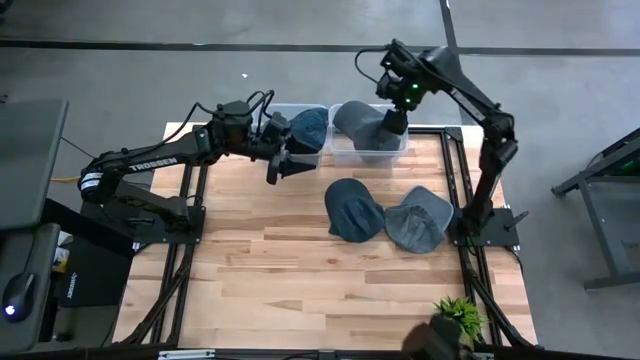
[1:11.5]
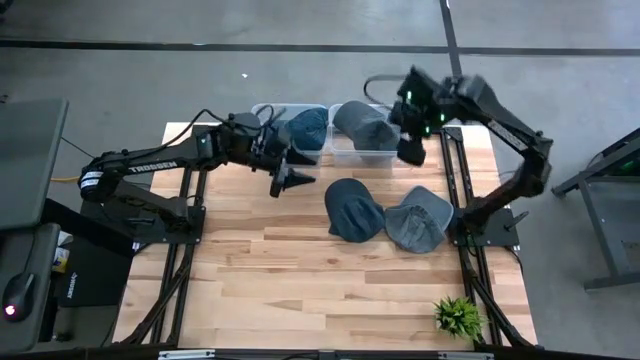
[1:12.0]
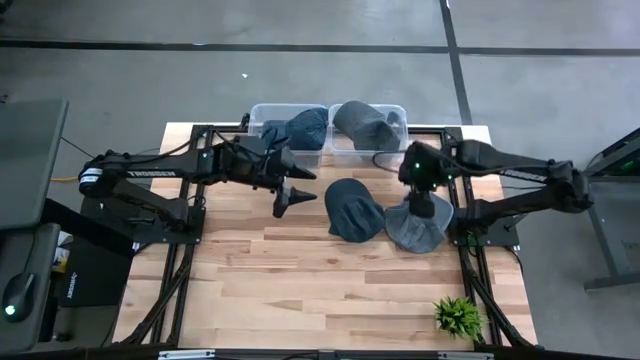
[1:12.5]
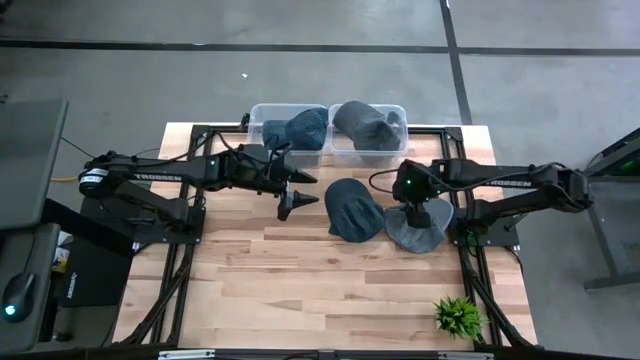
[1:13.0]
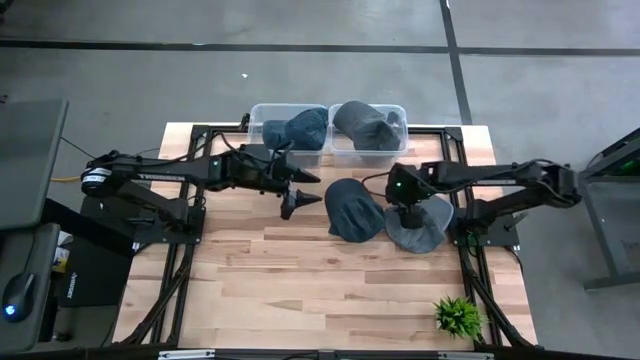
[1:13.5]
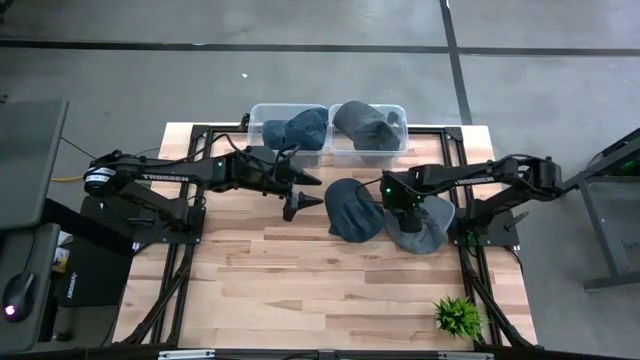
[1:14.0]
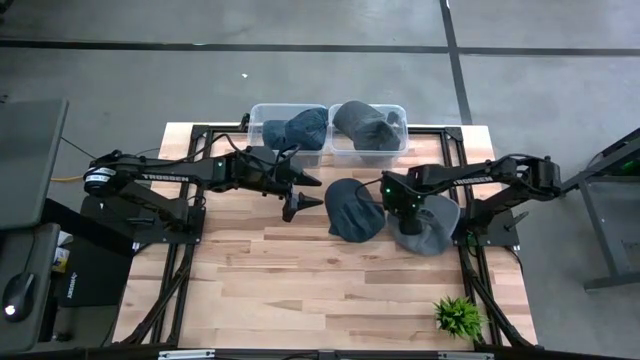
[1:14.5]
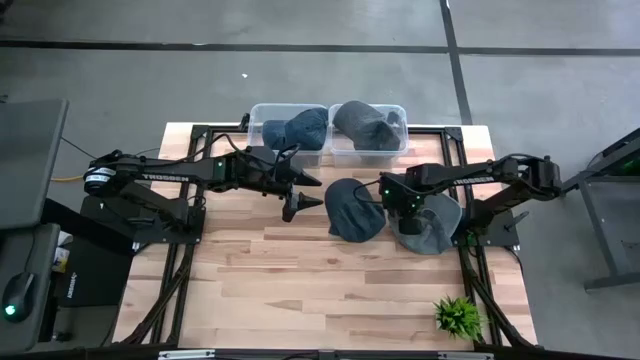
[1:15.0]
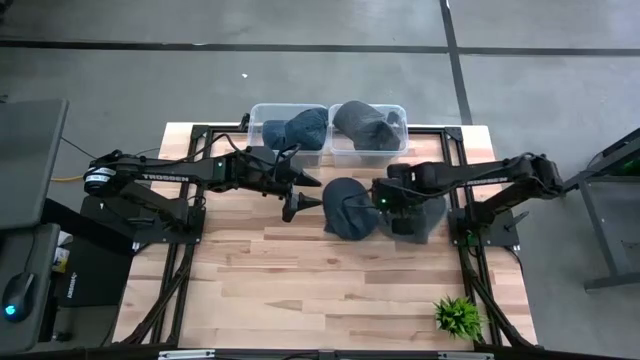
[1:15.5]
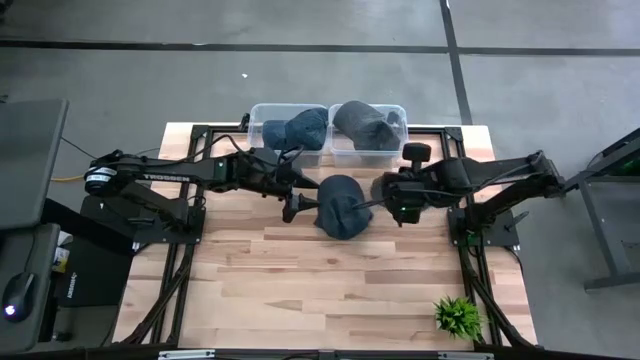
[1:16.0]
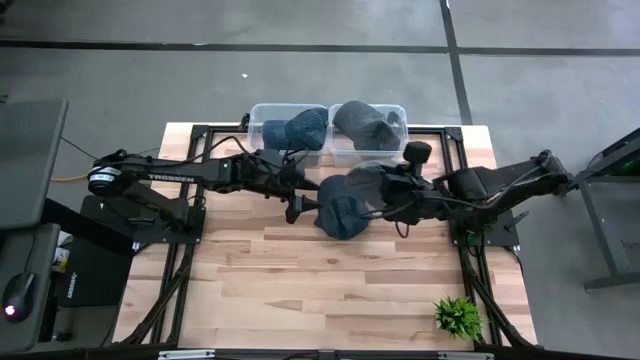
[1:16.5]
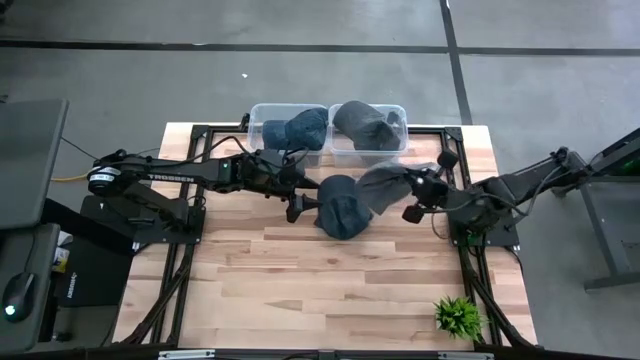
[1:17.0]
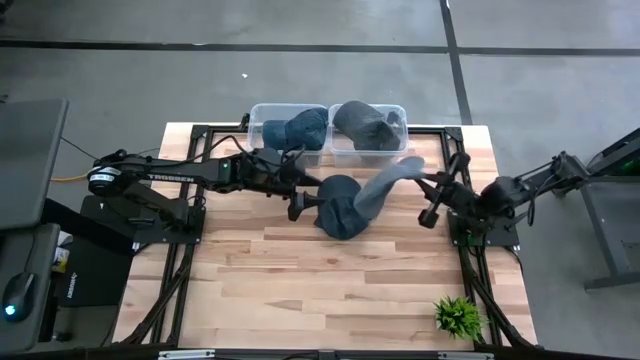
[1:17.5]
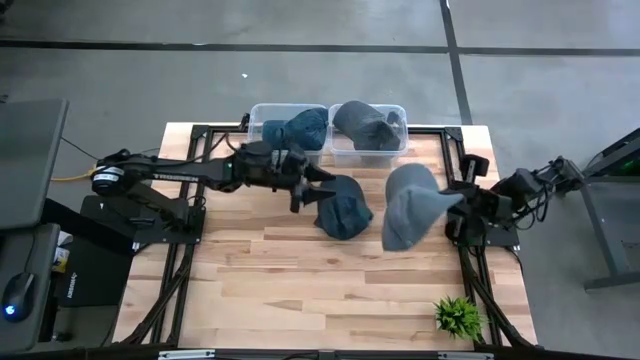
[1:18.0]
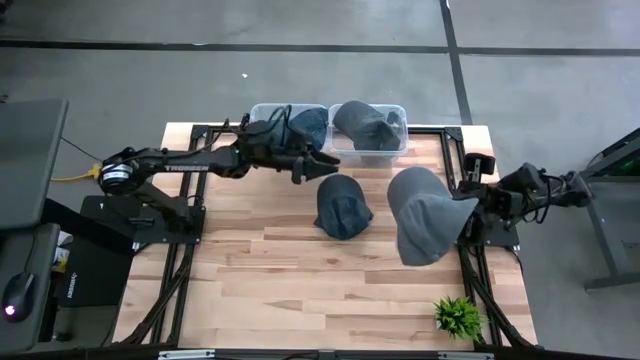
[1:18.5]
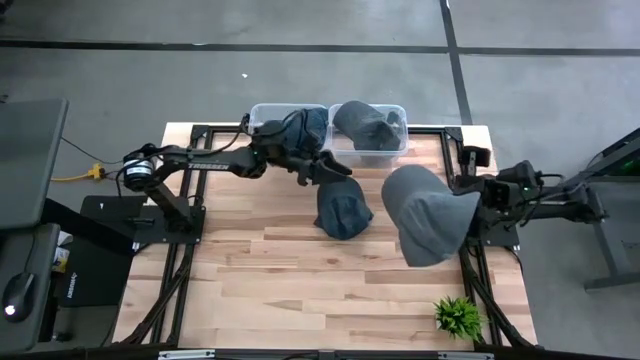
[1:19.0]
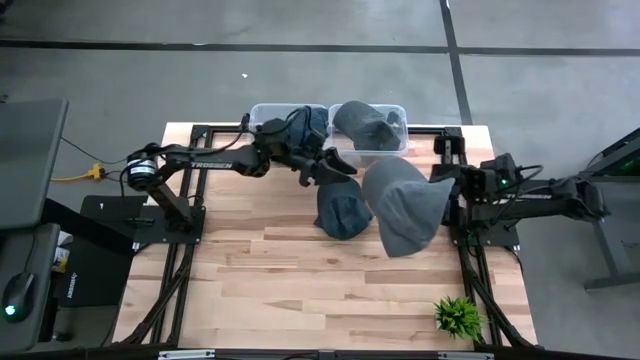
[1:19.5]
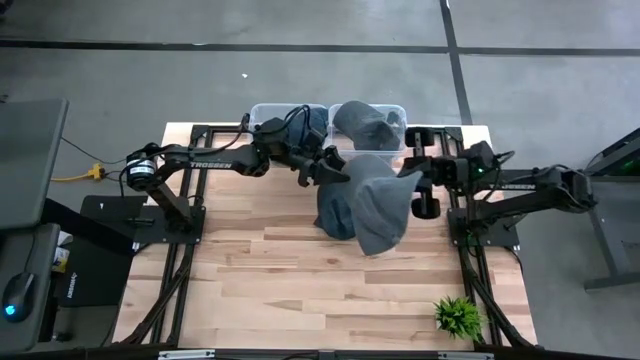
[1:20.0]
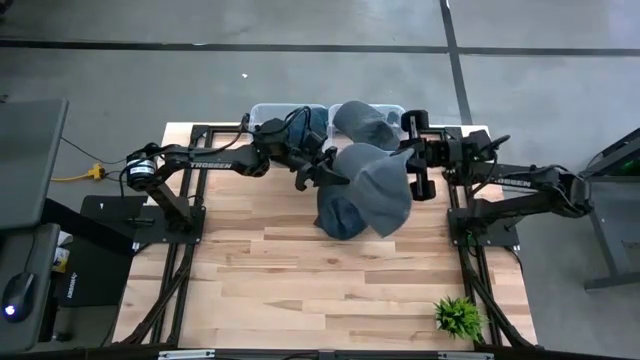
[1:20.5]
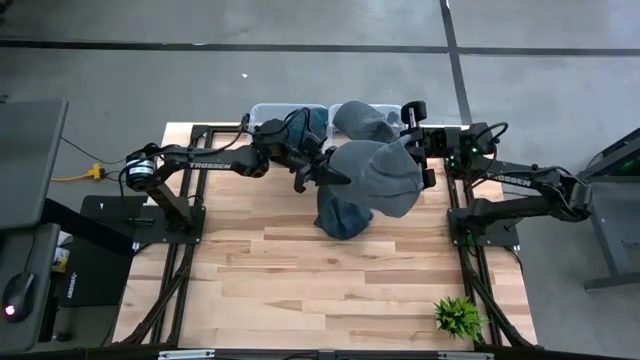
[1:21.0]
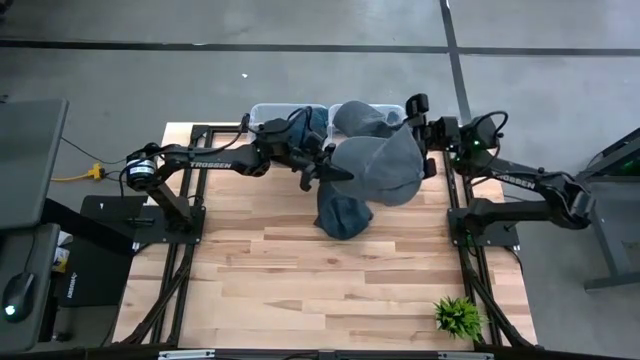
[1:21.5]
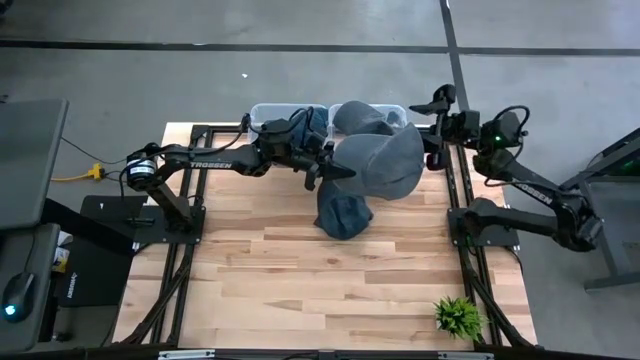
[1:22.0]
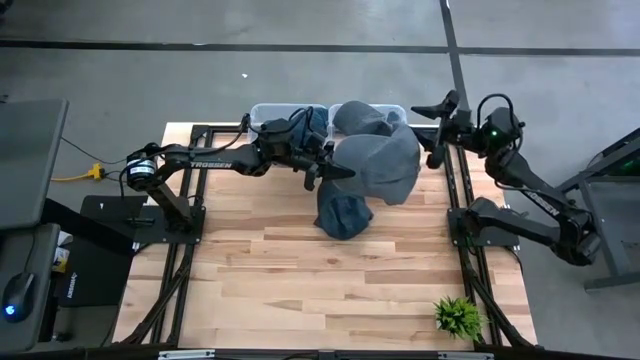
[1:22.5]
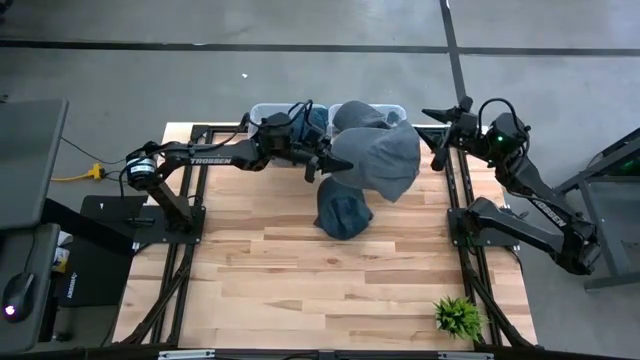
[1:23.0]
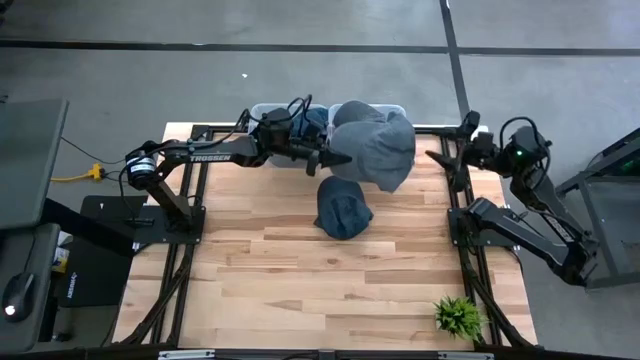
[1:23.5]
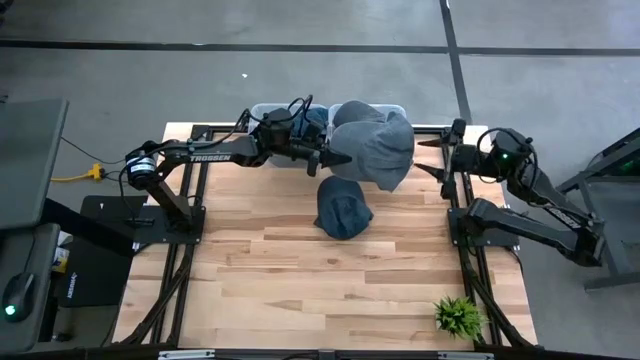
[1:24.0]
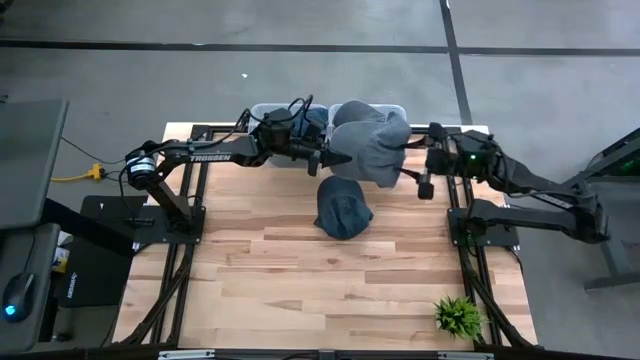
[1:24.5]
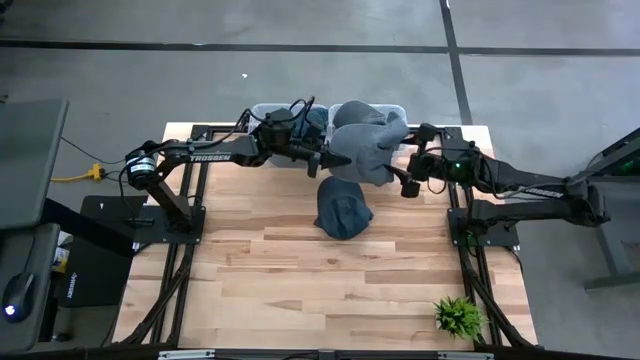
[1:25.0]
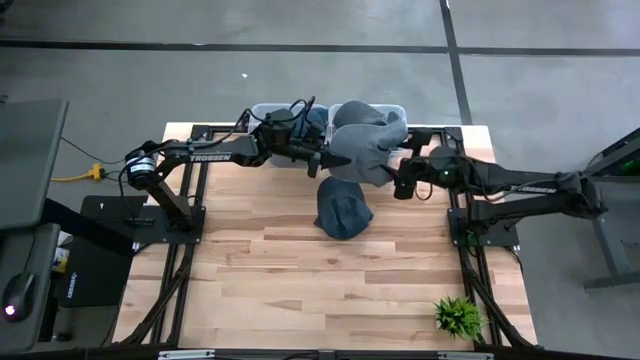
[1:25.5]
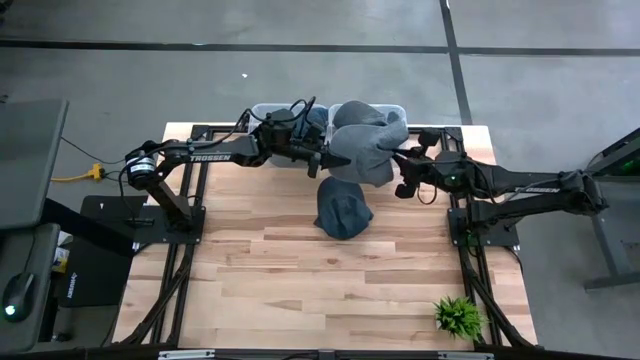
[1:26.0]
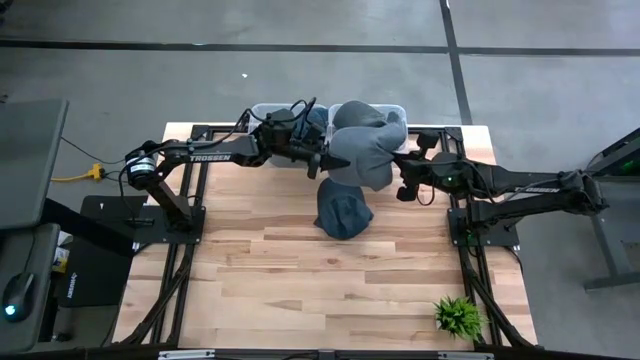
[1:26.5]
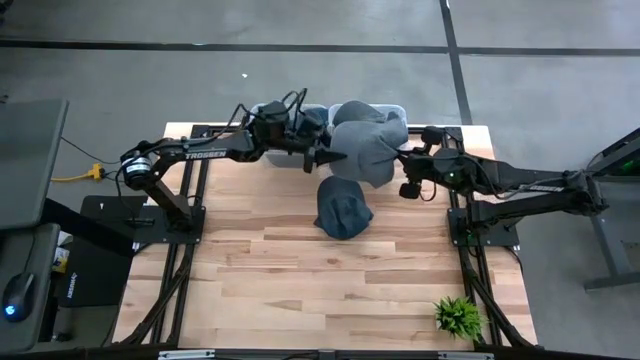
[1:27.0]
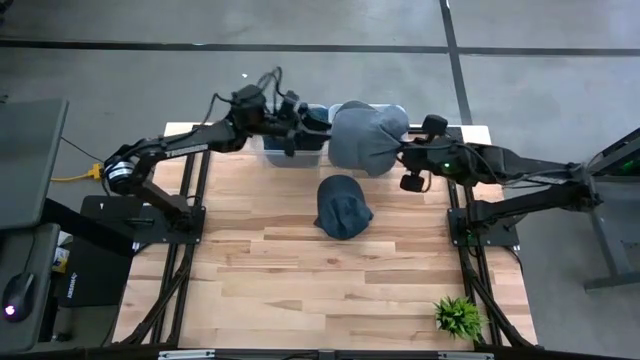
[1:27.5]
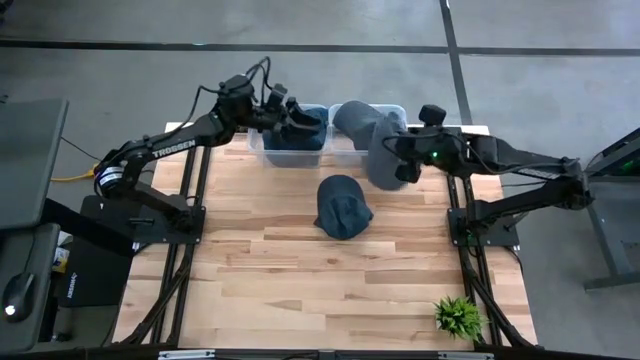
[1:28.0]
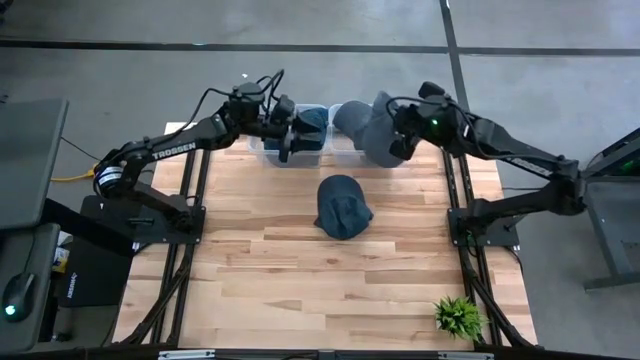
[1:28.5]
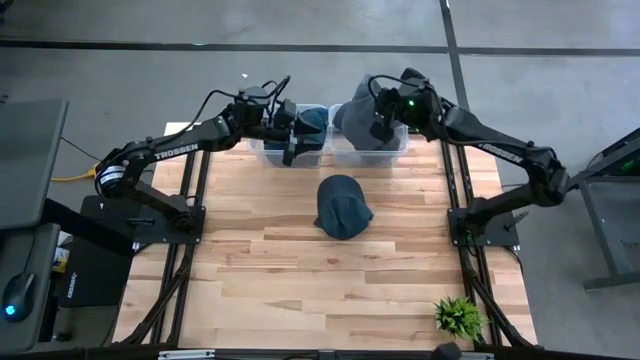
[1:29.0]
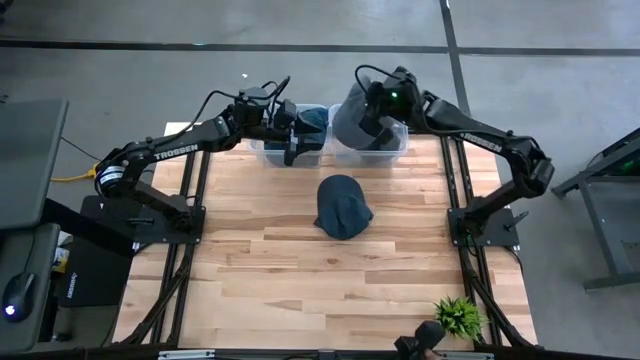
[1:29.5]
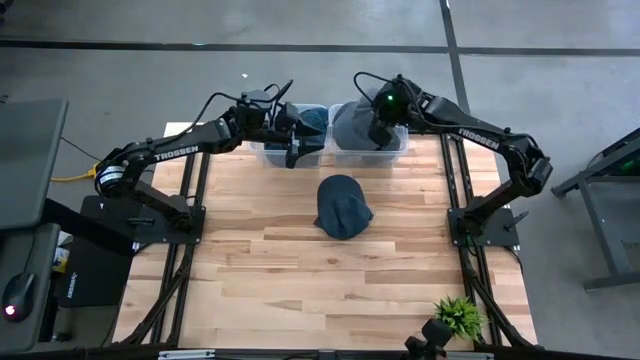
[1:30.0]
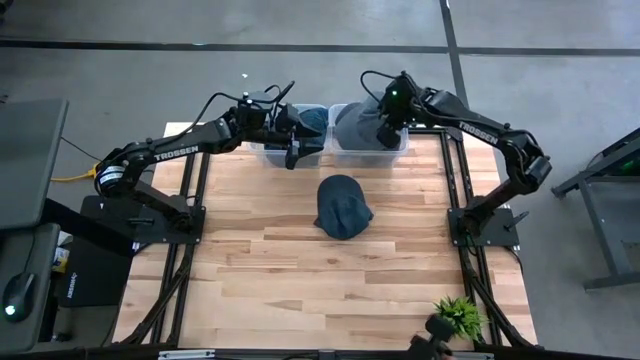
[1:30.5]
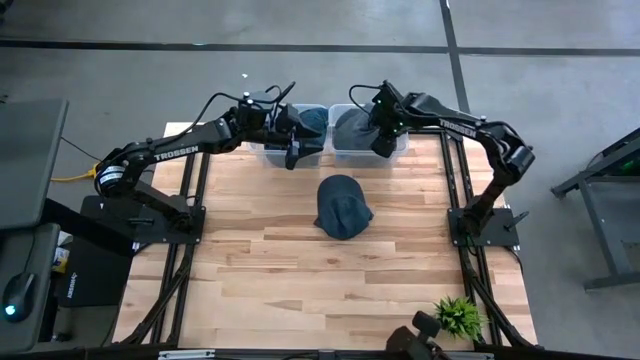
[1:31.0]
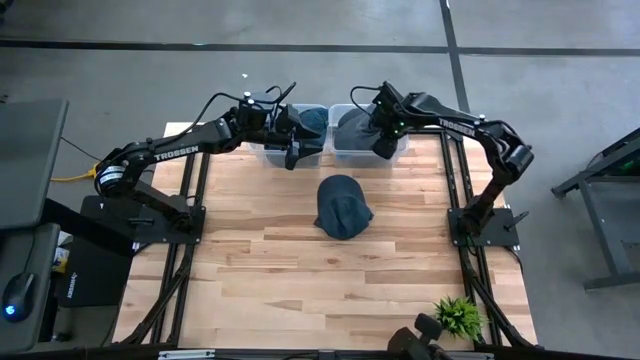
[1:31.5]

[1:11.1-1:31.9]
Task: Pick and place caps into container
Put the gray cap into the right transparent container
